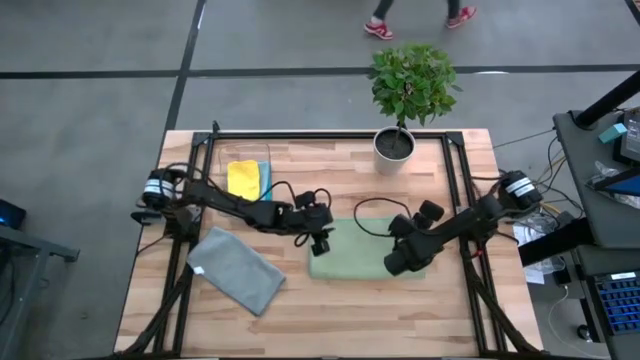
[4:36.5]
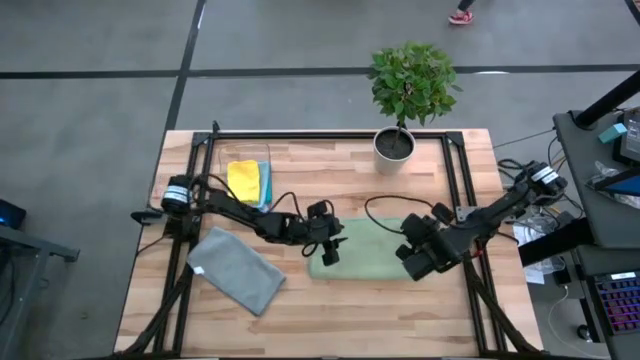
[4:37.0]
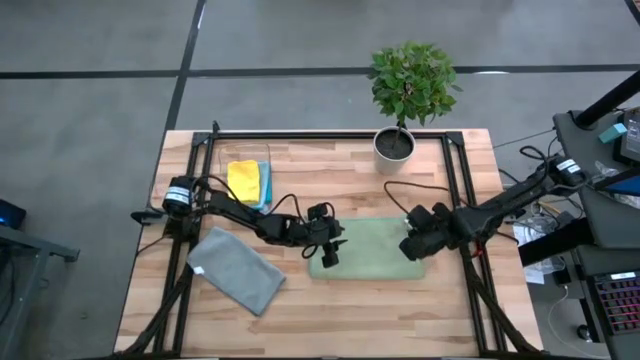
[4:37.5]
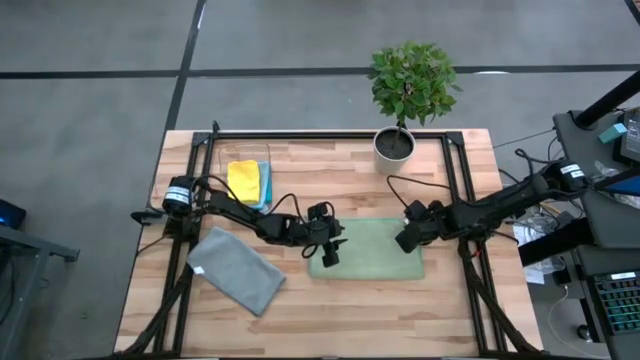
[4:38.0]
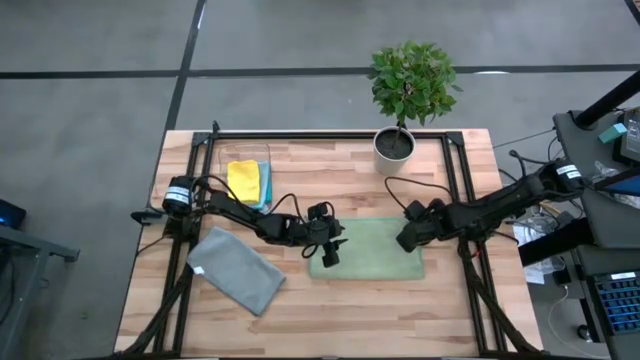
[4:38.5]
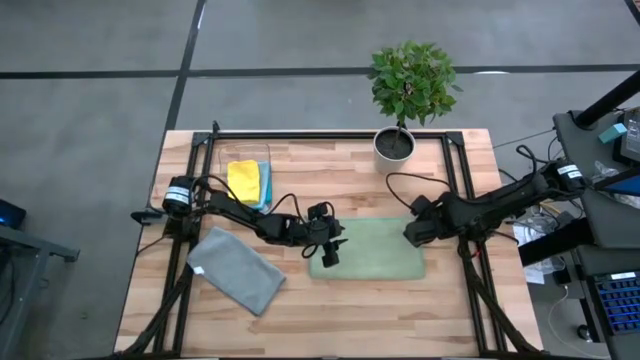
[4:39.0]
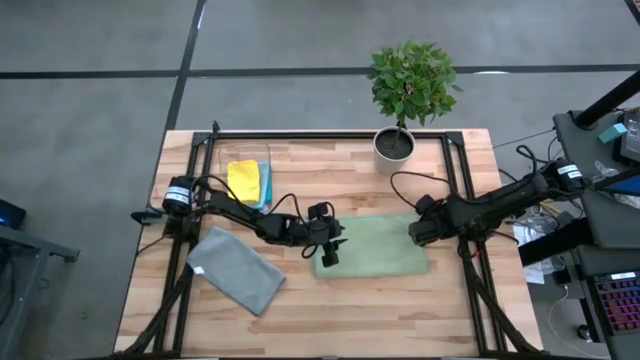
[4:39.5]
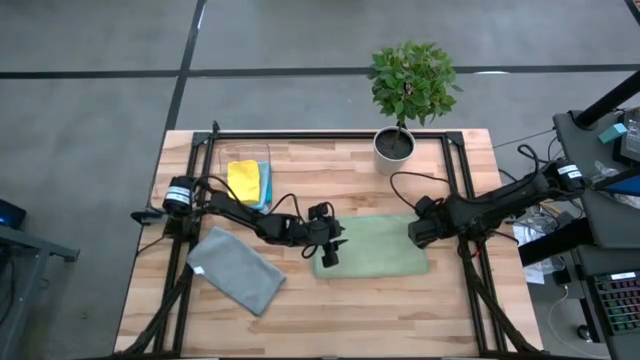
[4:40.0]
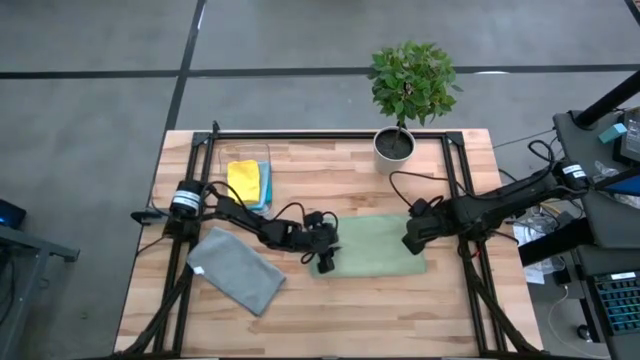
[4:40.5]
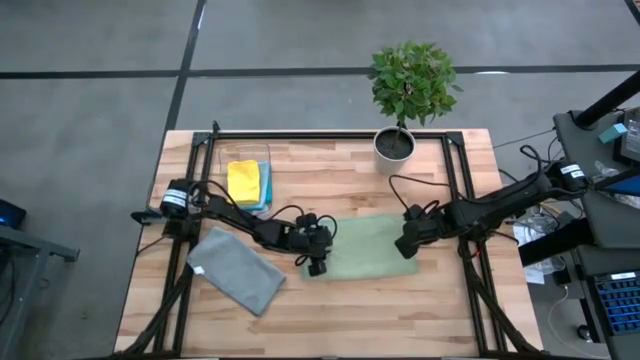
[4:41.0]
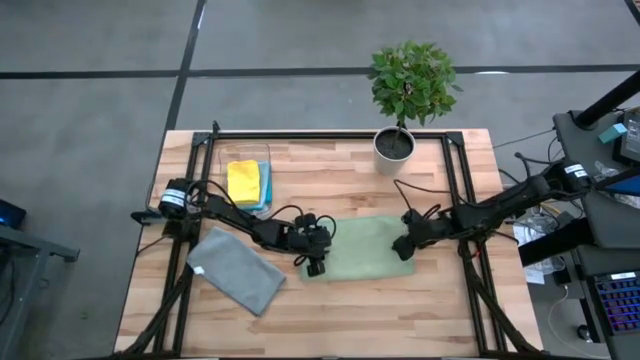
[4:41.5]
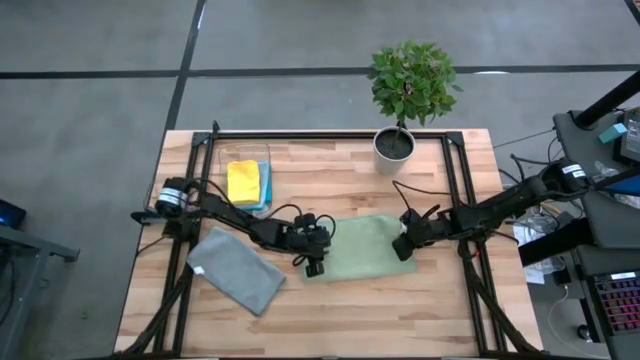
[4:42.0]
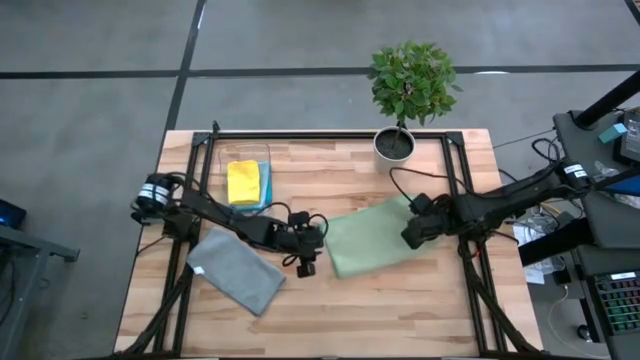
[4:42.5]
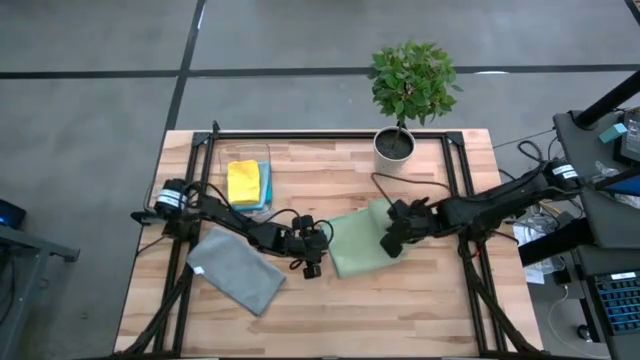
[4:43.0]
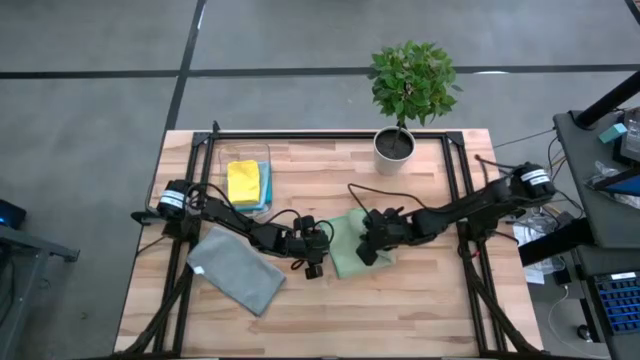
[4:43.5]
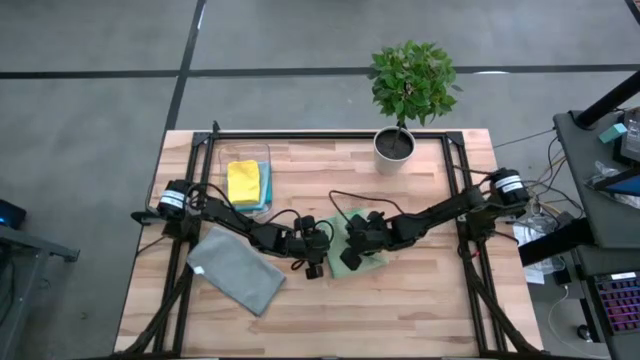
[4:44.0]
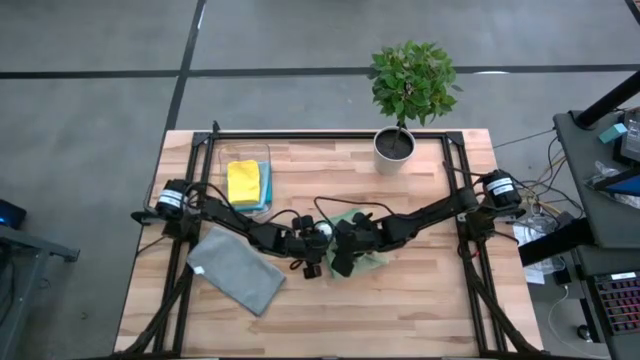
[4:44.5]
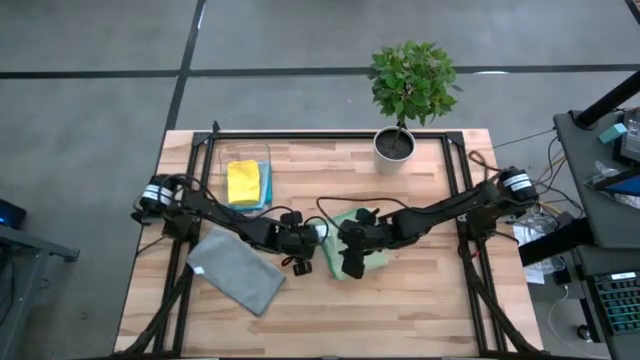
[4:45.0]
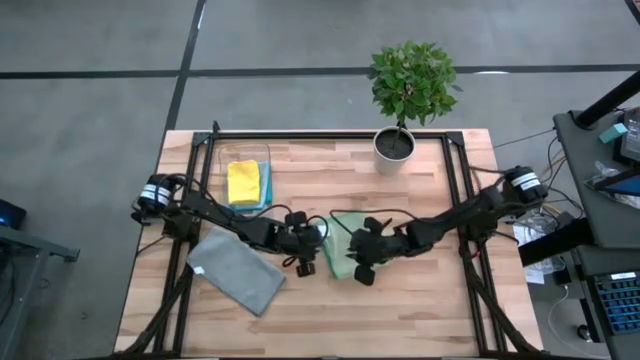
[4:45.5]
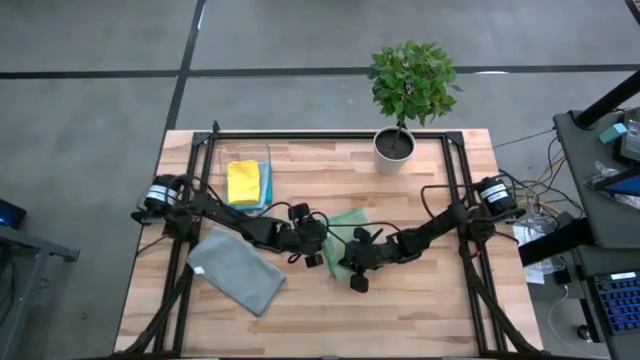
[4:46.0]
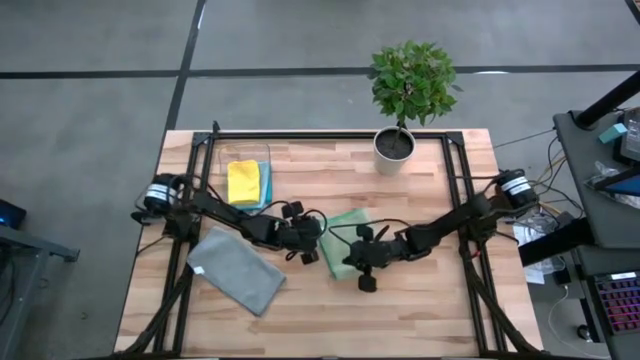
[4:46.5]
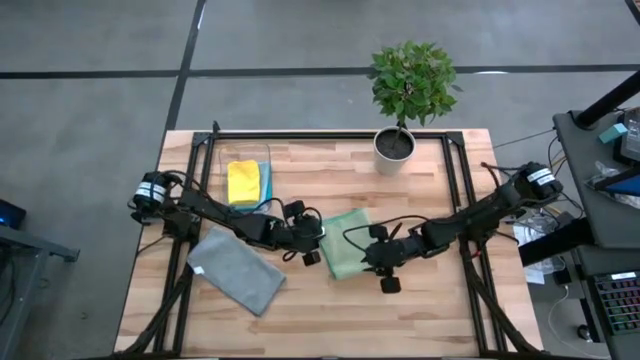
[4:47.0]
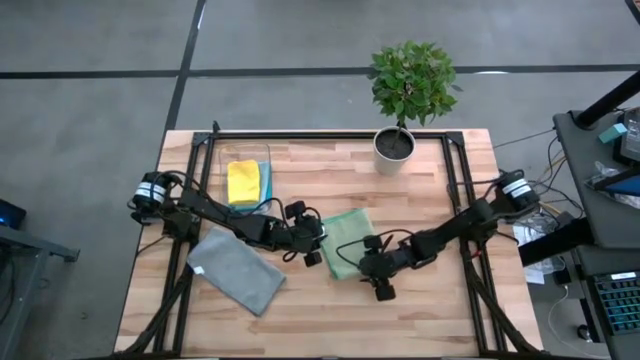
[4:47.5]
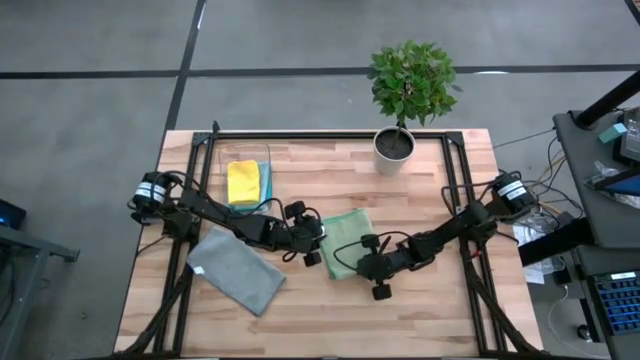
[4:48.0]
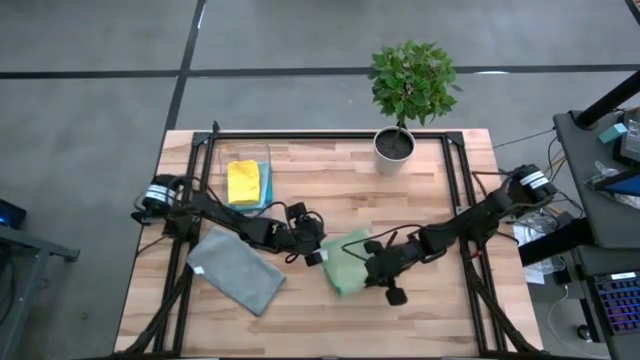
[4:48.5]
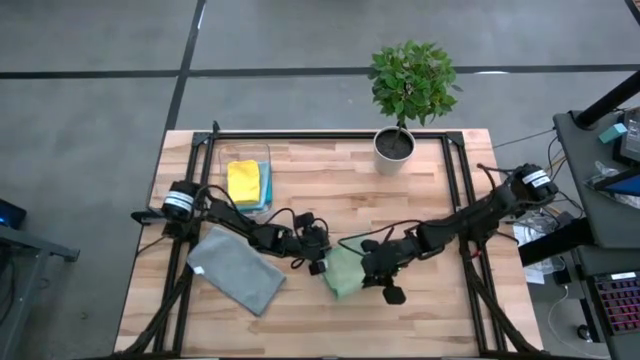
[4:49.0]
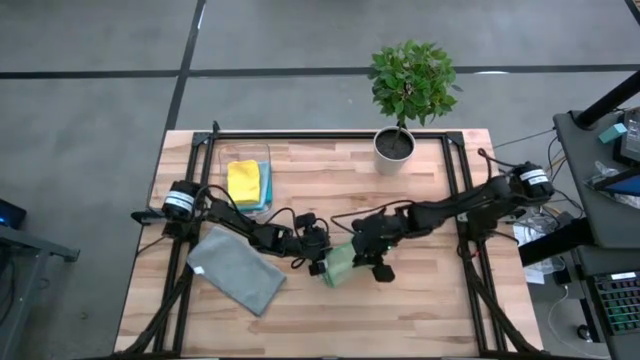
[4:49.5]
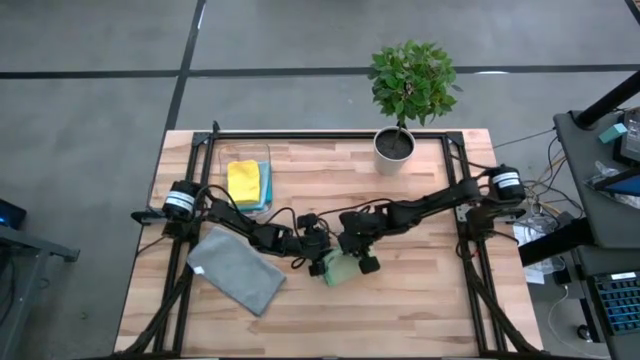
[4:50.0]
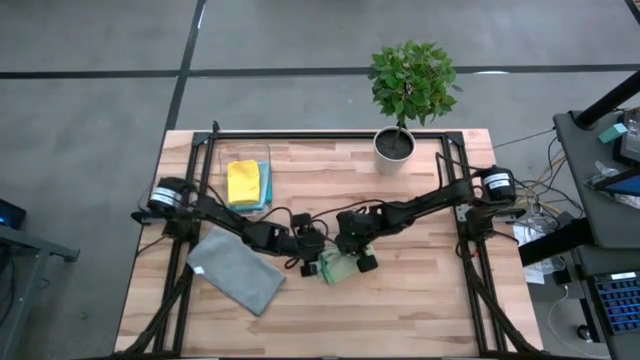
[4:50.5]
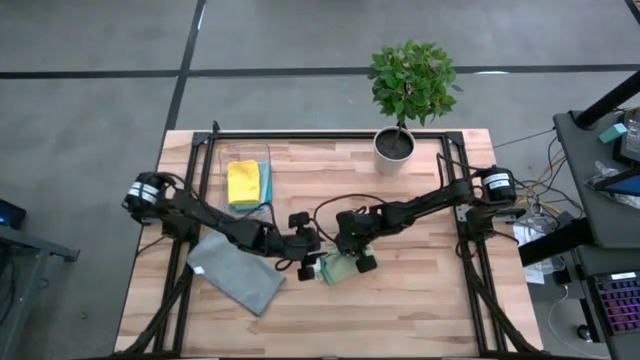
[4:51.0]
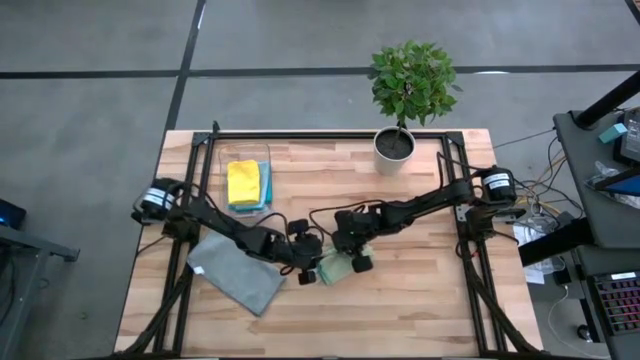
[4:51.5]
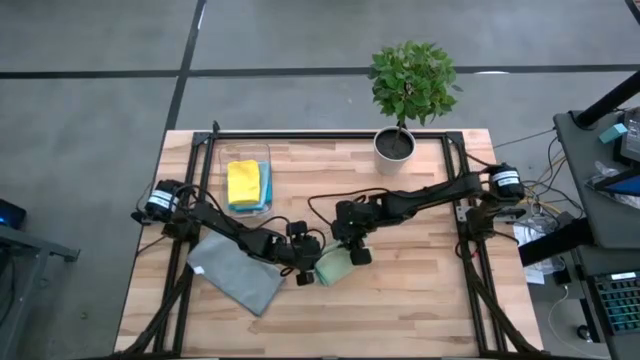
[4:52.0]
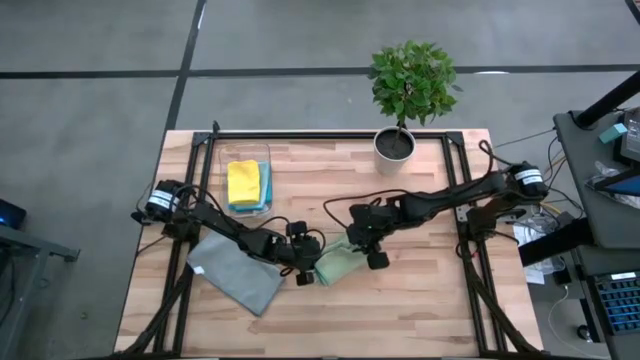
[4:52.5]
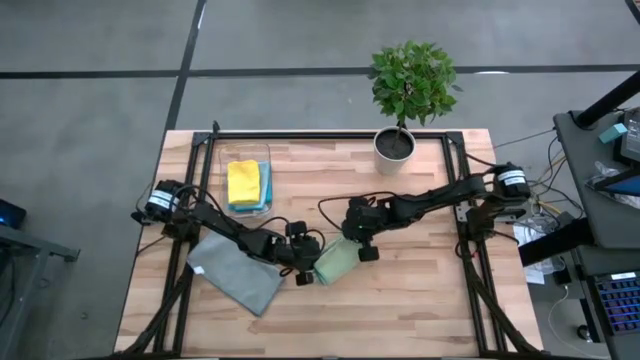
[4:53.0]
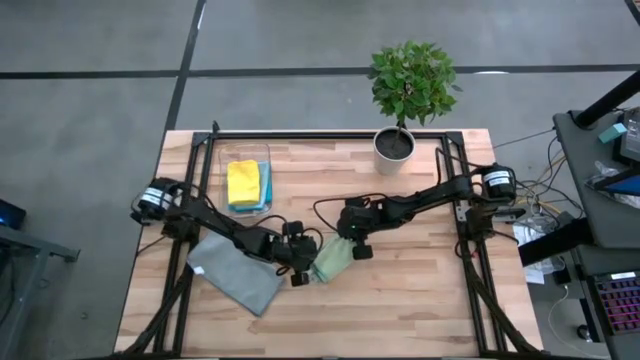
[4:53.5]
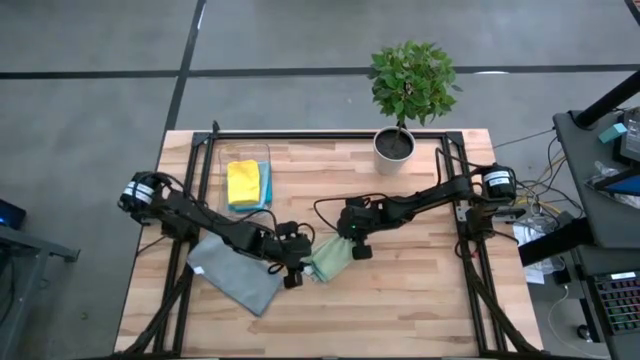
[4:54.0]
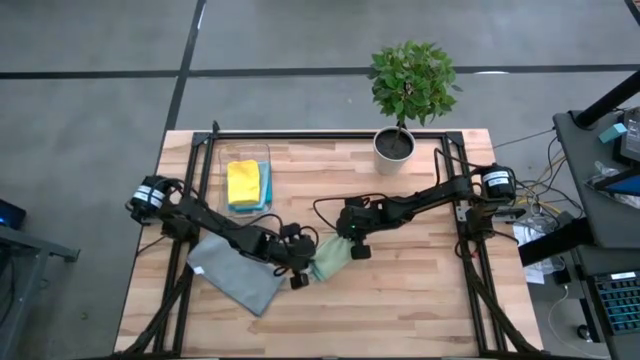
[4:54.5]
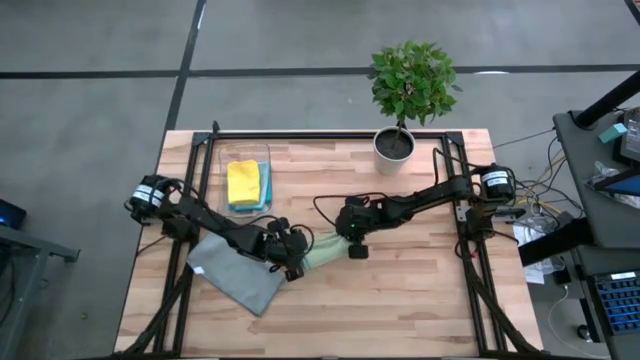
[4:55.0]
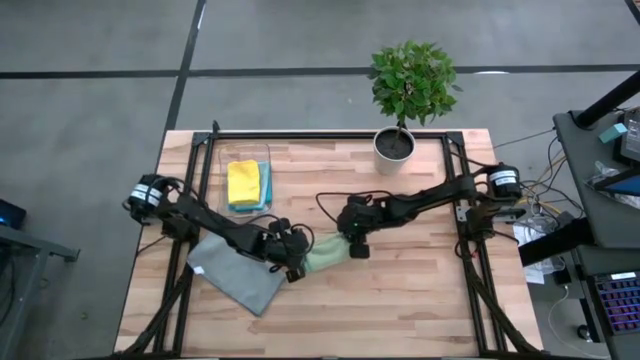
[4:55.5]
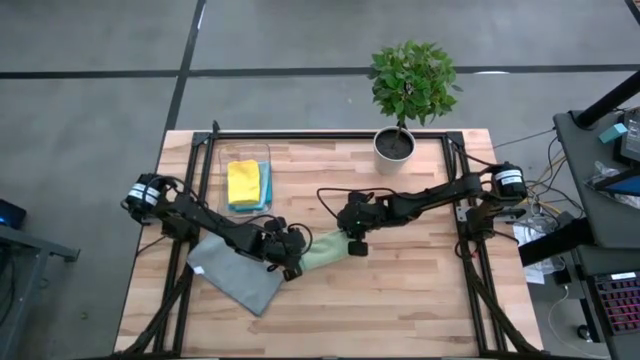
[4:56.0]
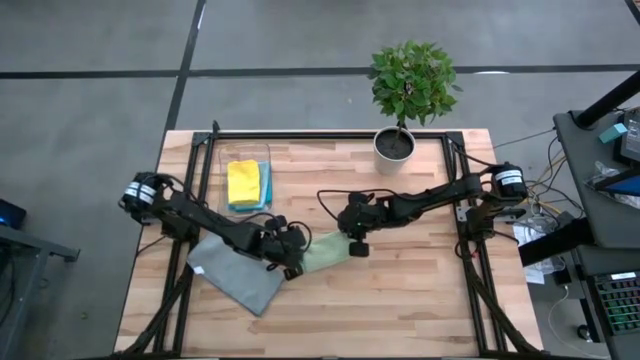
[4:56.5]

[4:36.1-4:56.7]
Task: Fold microfiber towels
Fold the light green microfiber towel

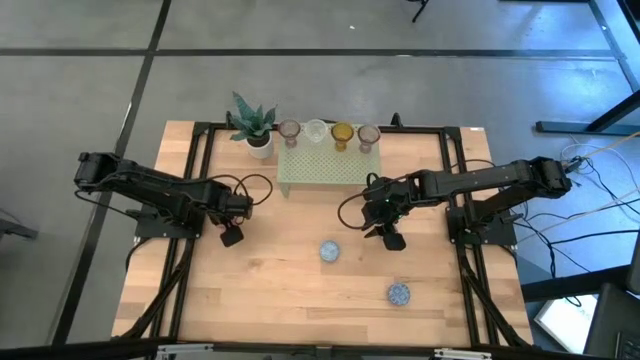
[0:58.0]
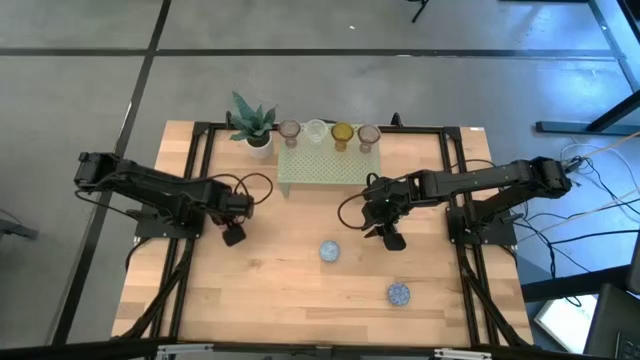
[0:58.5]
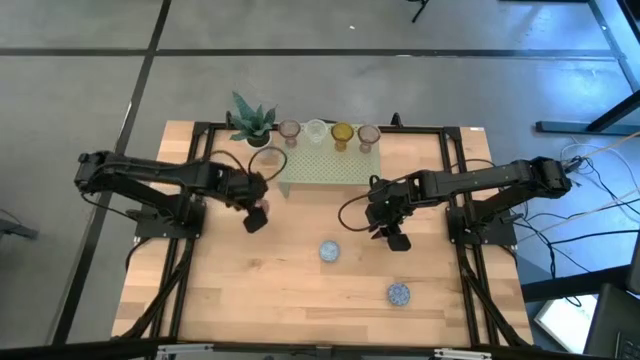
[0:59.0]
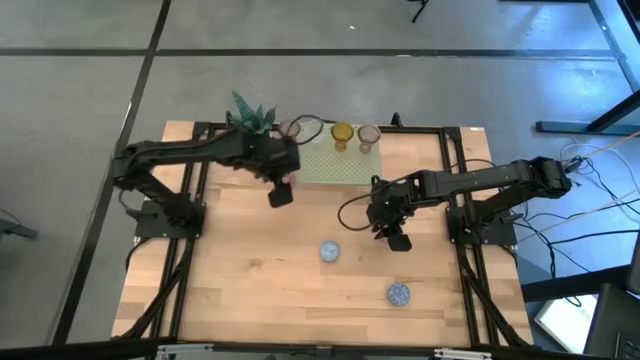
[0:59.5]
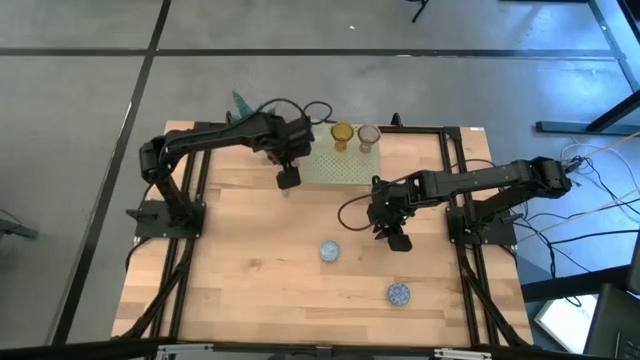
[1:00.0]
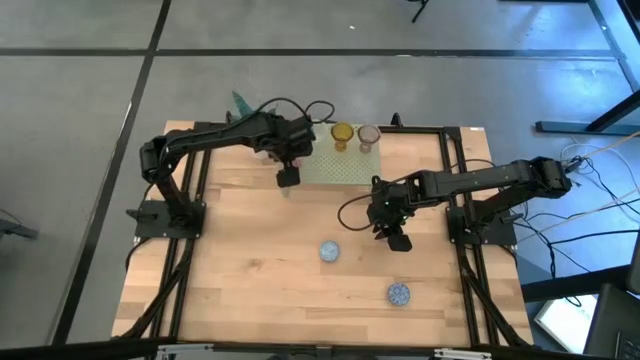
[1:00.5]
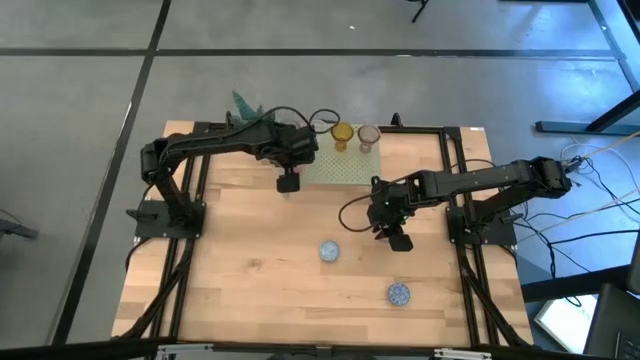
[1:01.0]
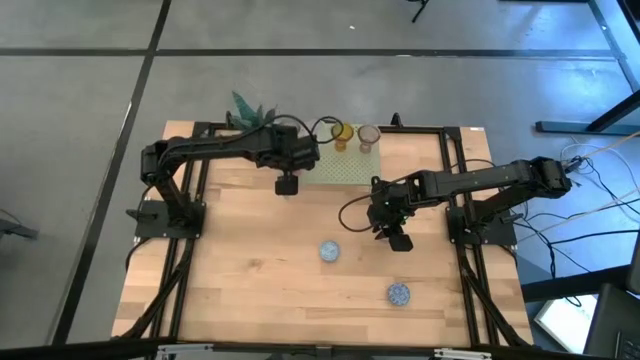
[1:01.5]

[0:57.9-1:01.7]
Task: Pick & Place candle stick holders
Put the pink scented candle on the shelf
